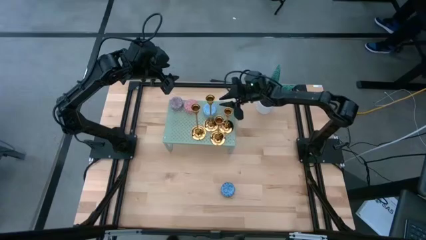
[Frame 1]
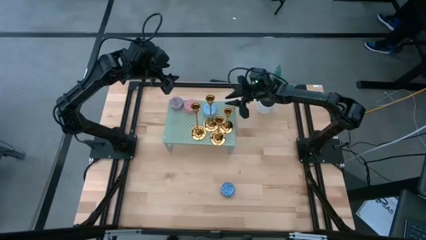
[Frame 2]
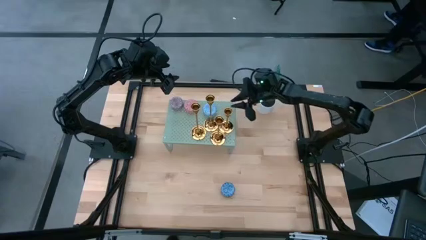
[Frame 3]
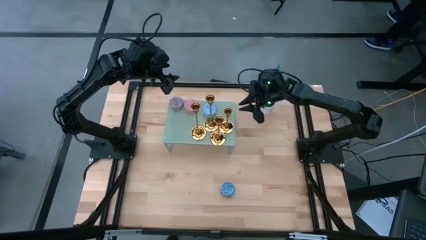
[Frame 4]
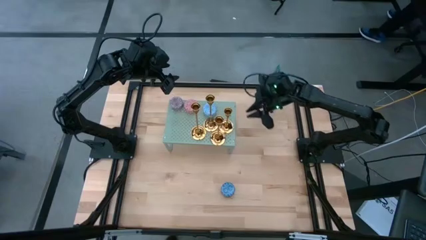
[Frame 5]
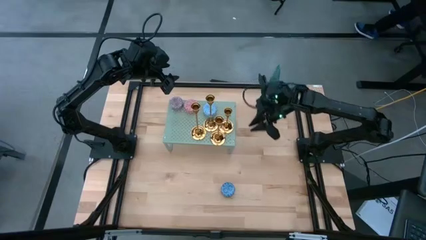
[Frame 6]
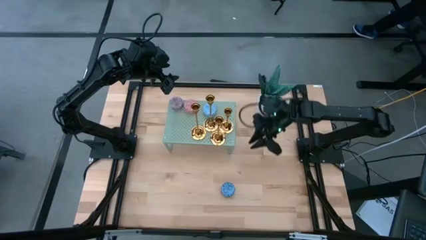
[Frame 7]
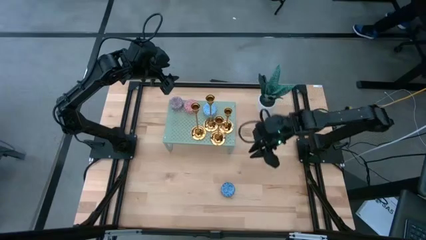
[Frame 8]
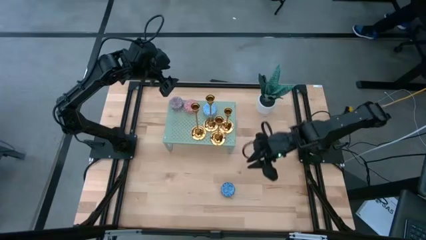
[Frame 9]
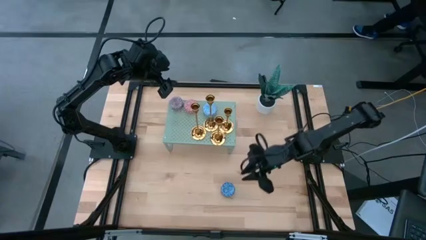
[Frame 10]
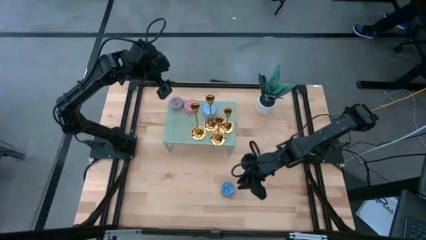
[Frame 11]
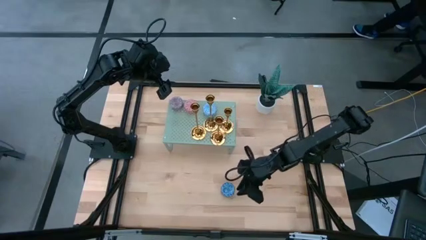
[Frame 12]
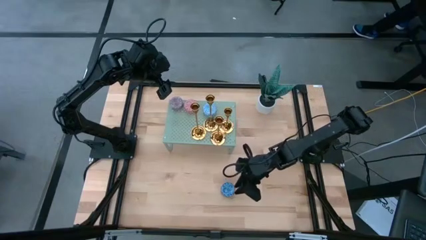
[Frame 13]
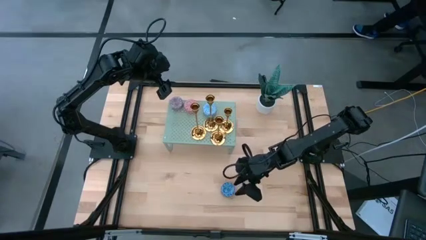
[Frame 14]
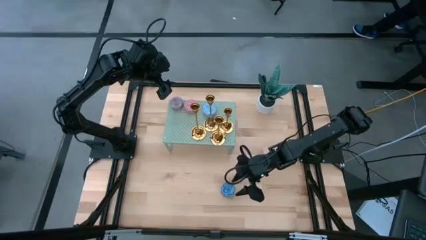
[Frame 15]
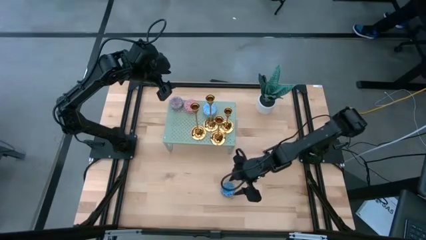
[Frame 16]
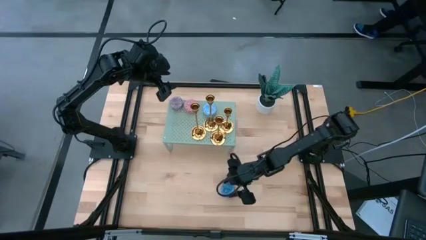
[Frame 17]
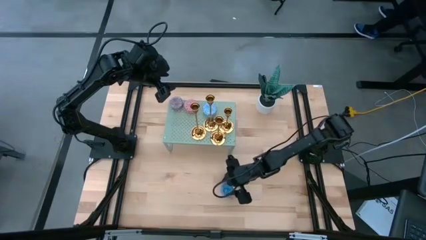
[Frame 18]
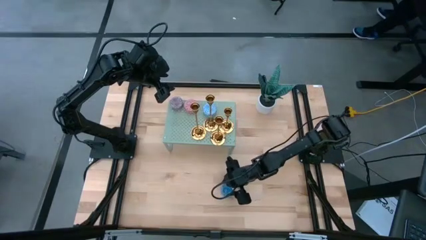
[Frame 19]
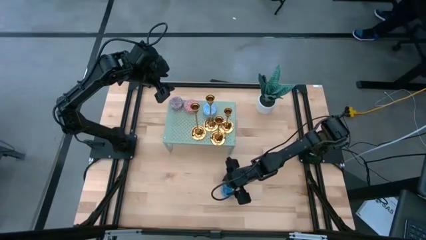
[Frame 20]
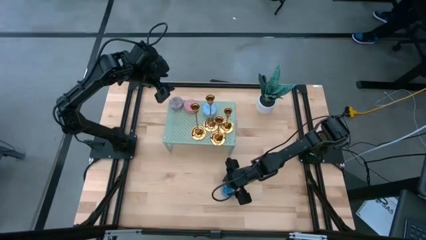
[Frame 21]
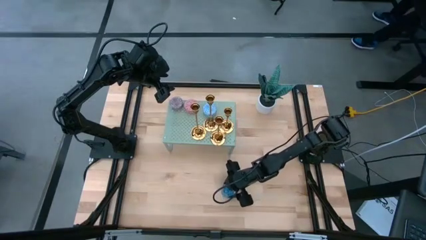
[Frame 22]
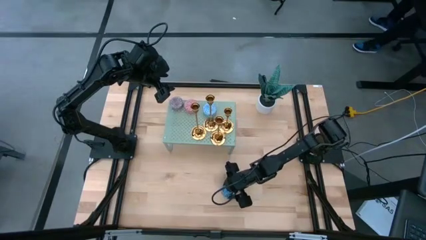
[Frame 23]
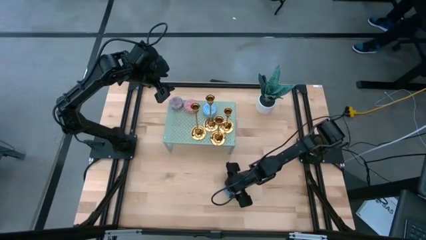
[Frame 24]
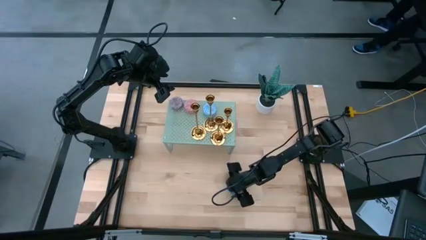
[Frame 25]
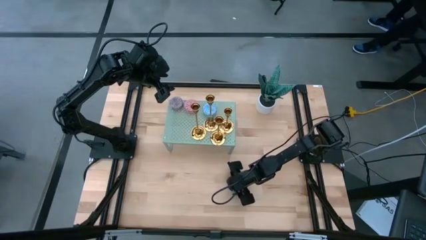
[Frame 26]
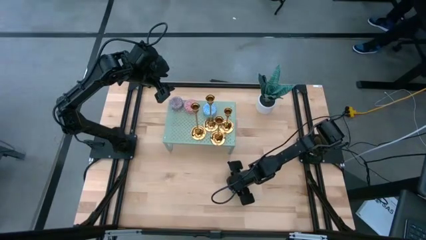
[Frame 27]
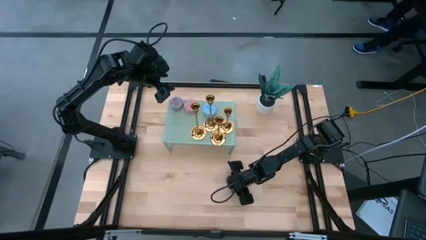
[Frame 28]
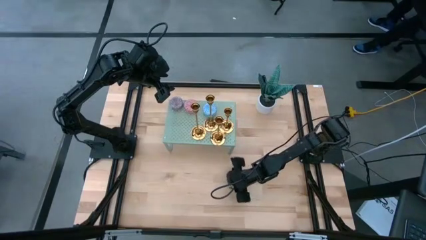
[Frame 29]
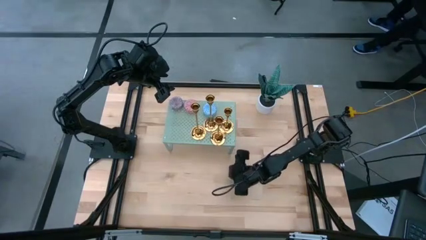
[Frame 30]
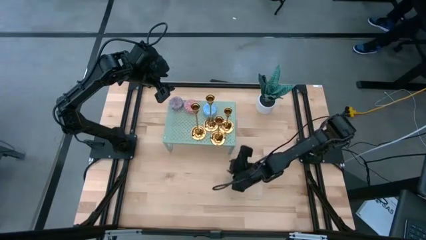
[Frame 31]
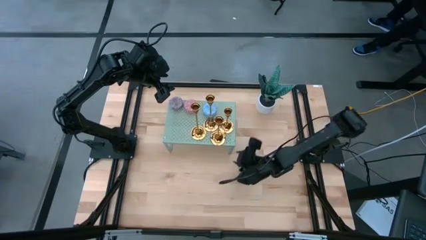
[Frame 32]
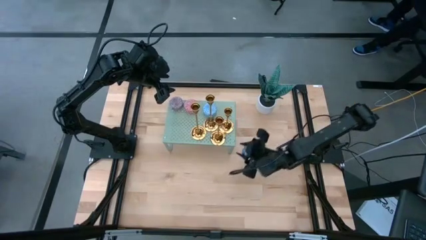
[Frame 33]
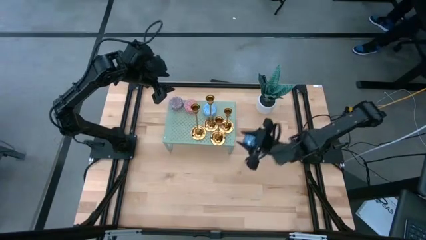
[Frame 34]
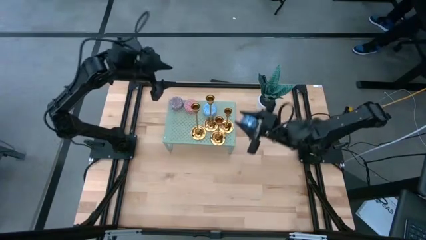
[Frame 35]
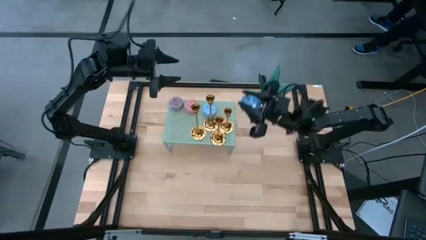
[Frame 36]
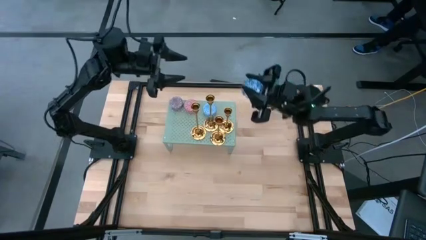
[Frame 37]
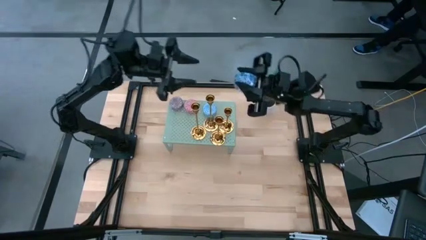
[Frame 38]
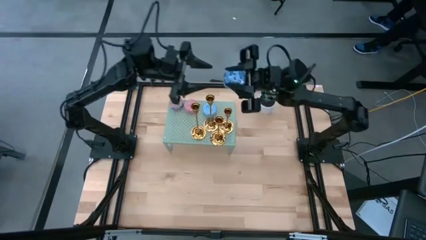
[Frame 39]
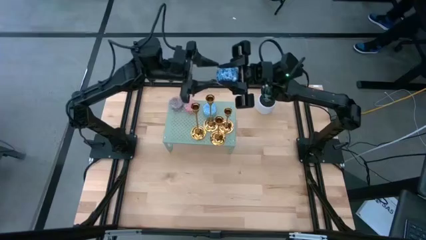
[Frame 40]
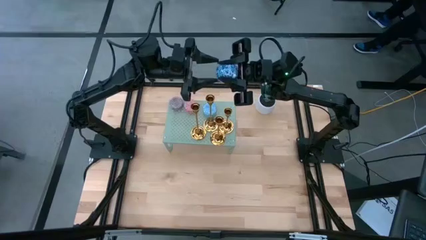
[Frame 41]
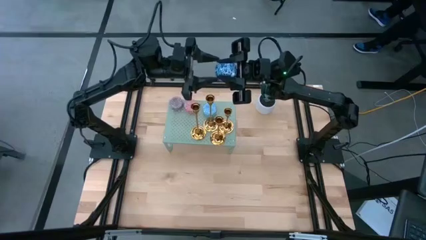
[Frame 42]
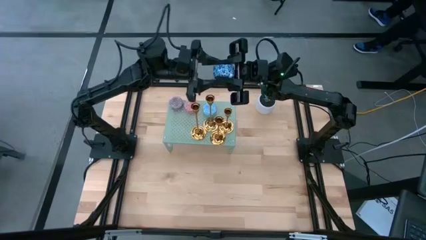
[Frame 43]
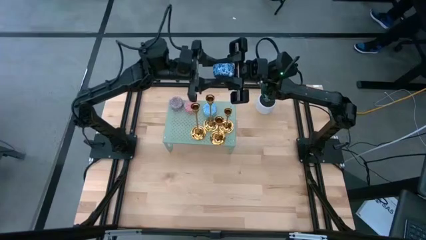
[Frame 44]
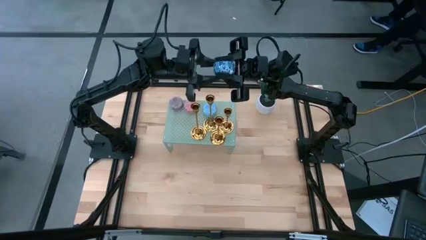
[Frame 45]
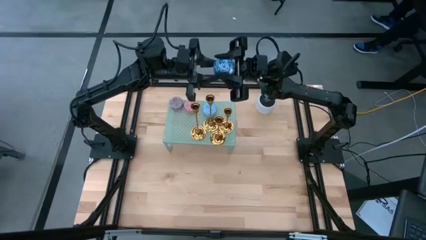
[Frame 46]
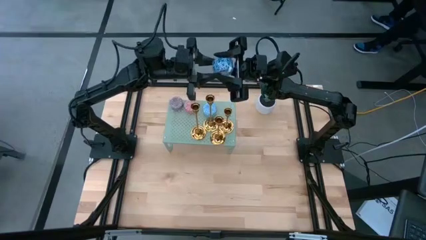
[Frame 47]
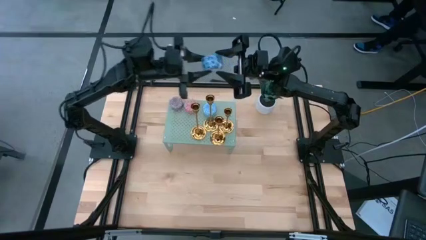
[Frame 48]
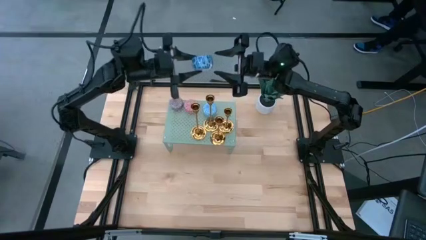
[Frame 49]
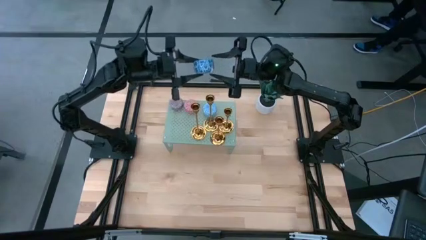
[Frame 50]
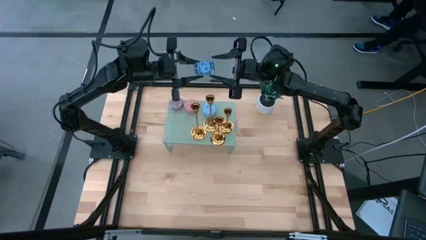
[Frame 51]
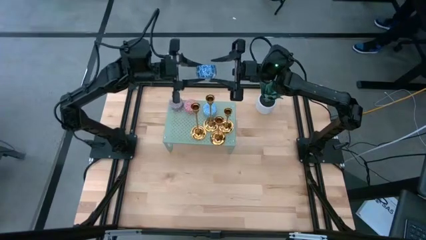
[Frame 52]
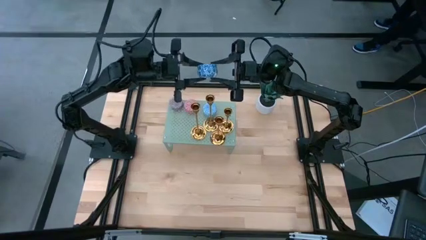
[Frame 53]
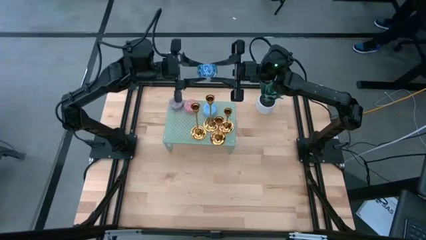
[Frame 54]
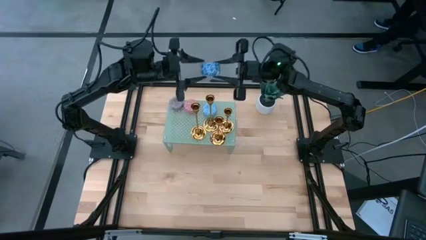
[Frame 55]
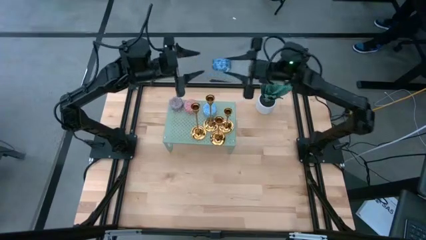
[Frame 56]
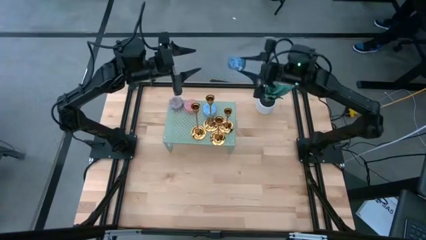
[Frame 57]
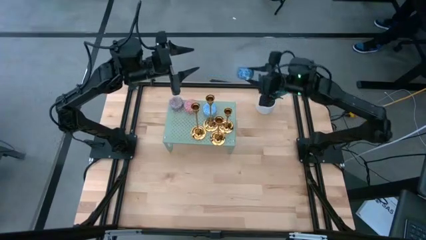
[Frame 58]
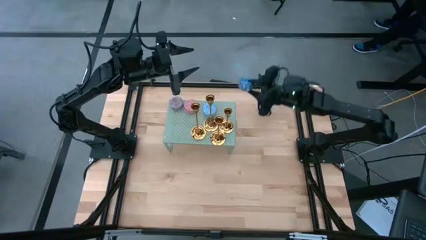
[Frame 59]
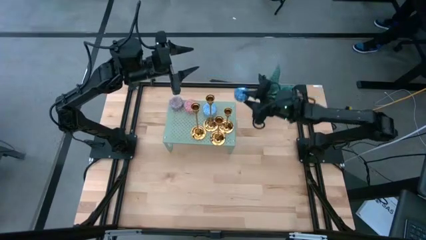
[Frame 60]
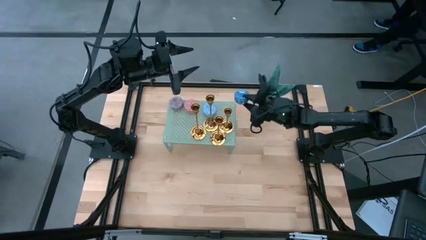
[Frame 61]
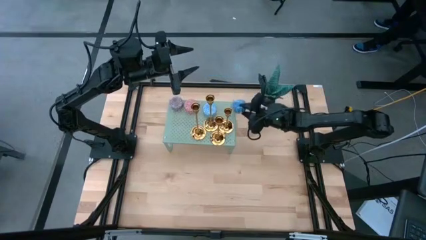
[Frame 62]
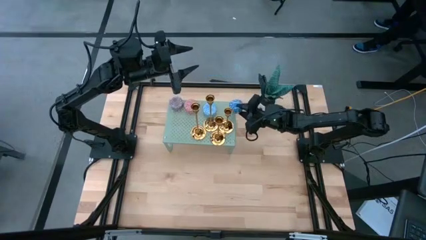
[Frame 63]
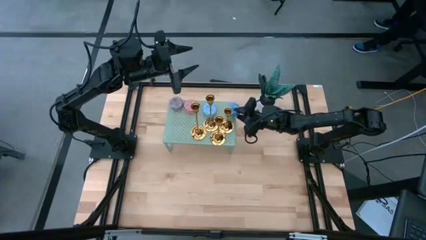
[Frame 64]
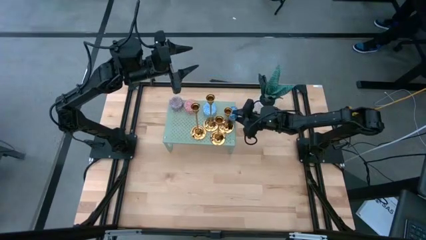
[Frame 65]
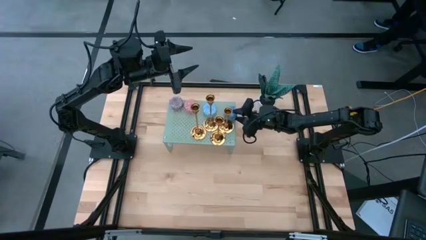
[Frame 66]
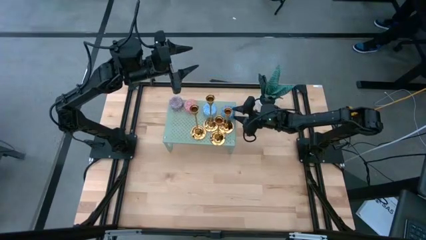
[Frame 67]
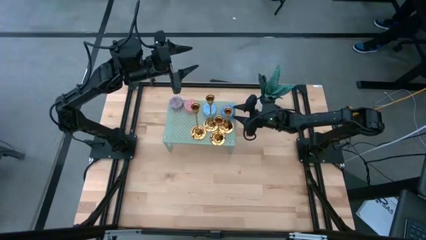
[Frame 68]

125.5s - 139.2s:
Task: Pick & Place candle stick holders
Put the blue scented candle on the shelf
